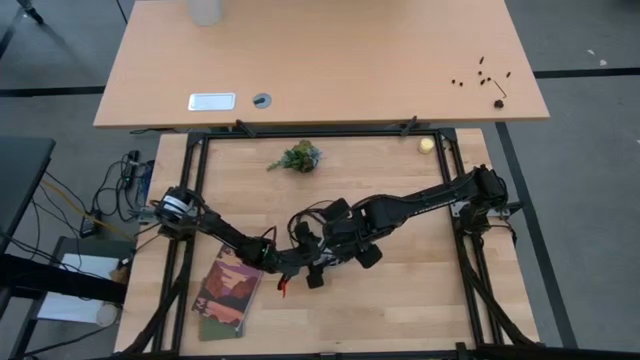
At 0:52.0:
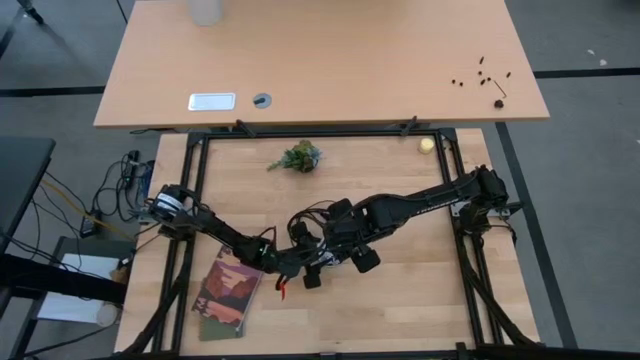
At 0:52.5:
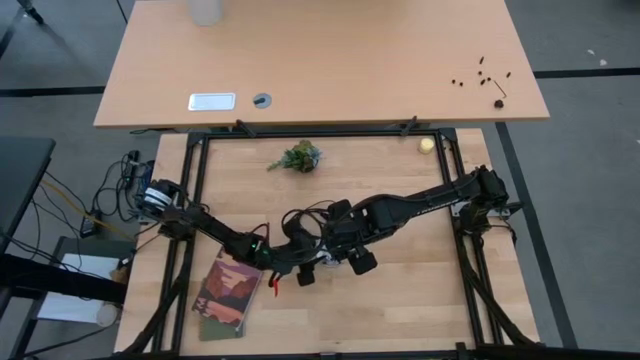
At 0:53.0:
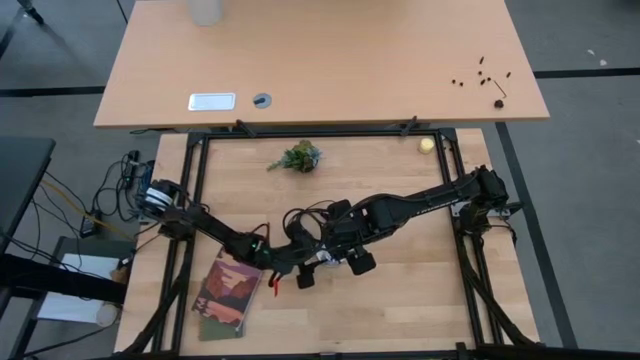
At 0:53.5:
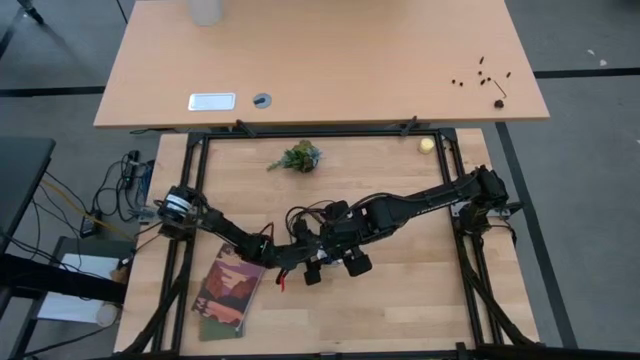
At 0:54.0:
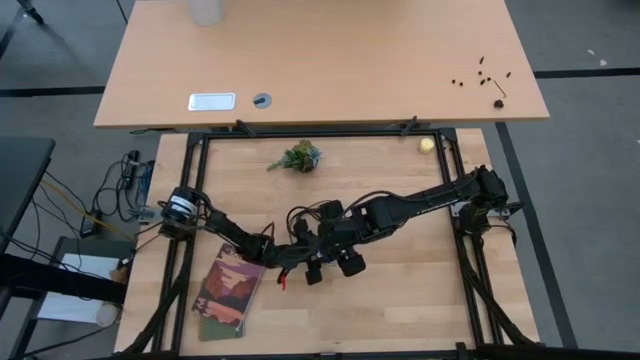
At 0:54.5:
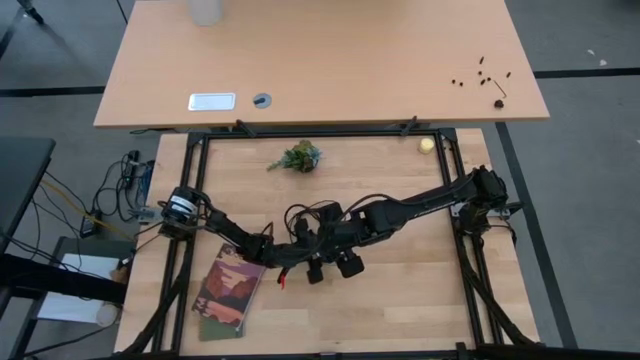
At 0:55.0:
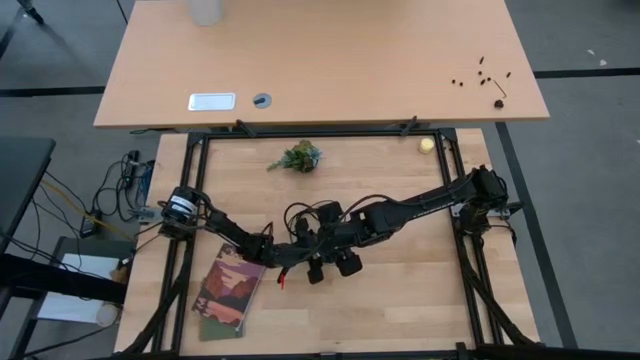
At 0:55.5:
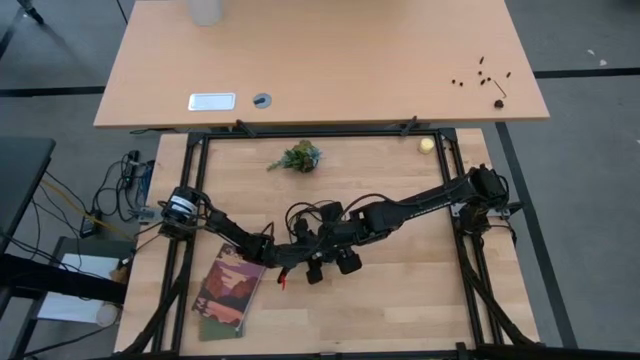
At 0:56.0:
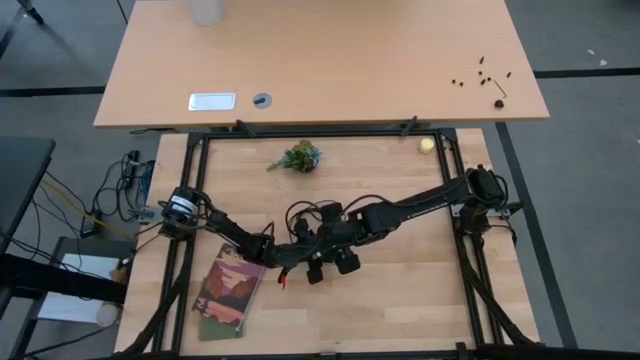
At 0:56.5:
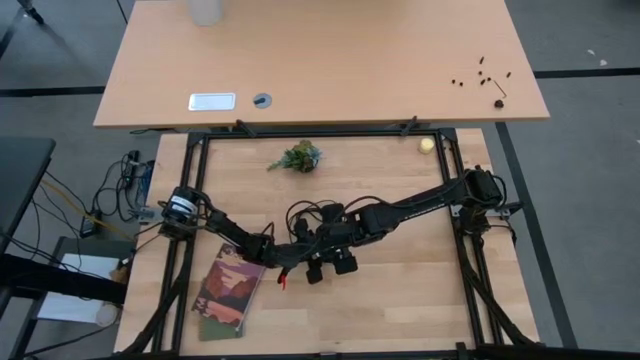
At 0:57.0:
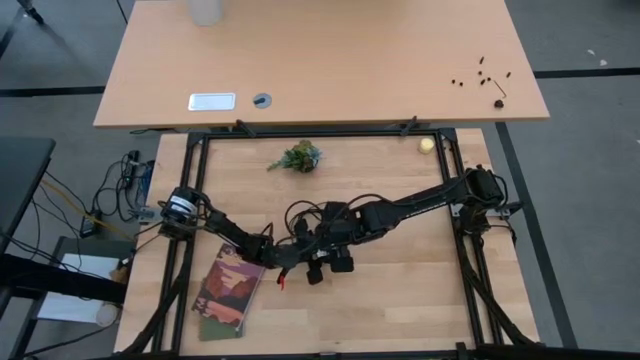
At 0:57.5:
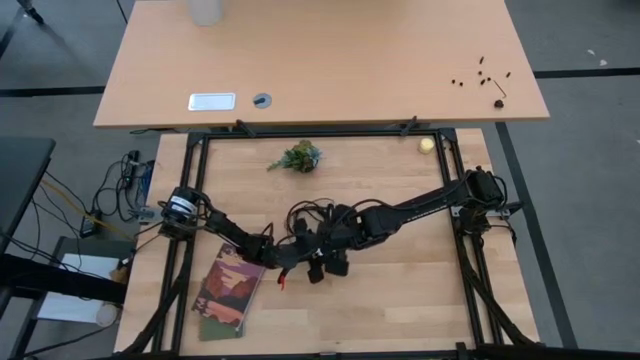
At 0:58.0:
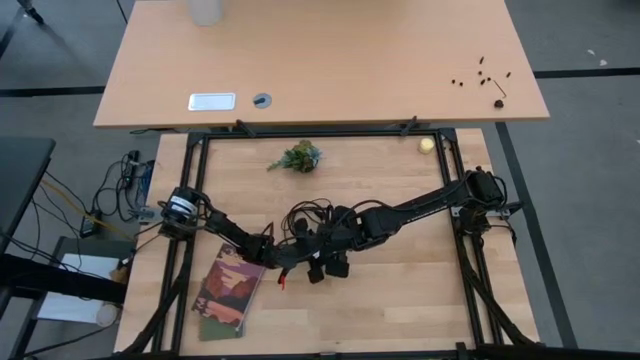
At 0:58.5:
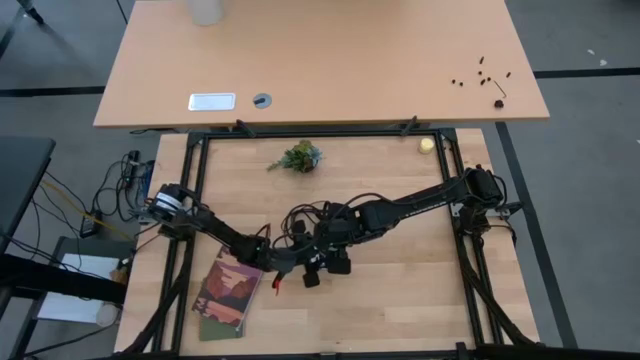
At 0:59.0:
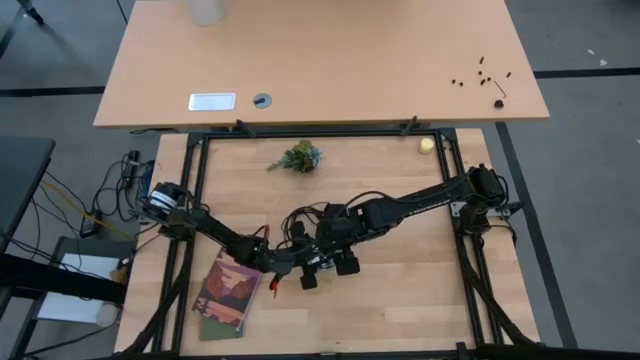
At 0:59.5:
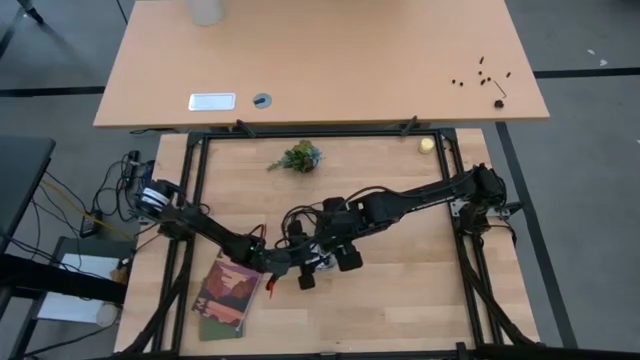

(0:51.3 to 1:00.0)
Task: Screw lightbulb
Insert the white lightbulb into the lamp socket

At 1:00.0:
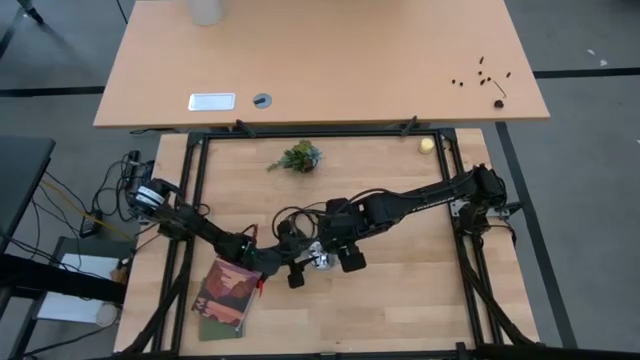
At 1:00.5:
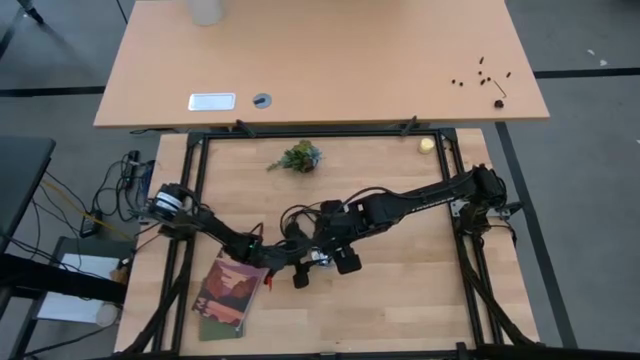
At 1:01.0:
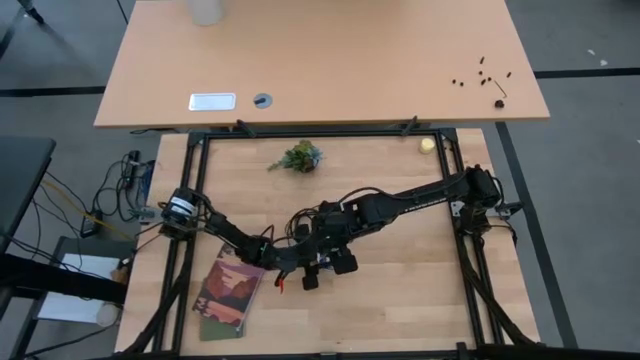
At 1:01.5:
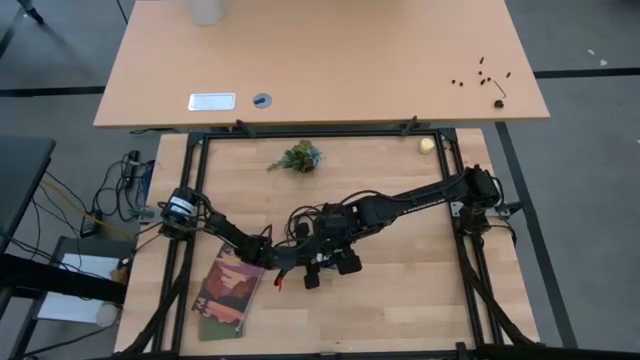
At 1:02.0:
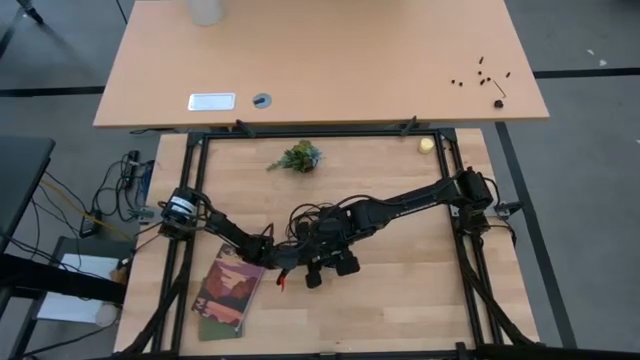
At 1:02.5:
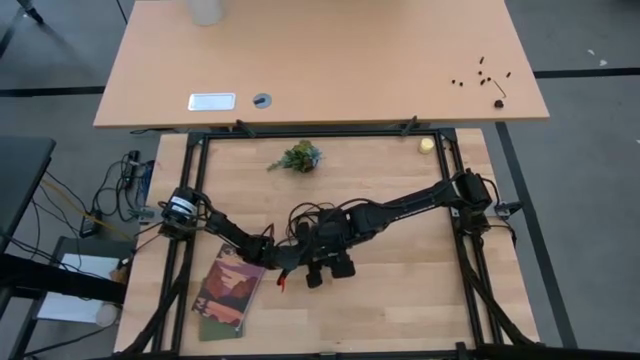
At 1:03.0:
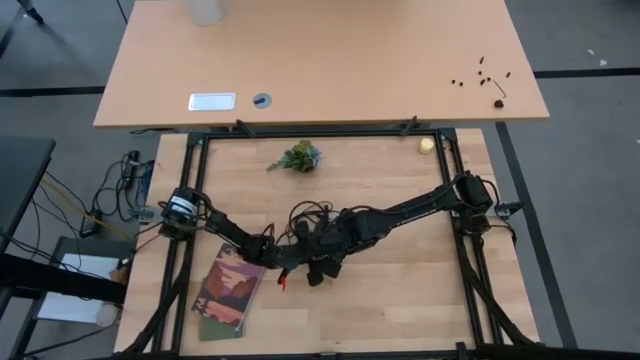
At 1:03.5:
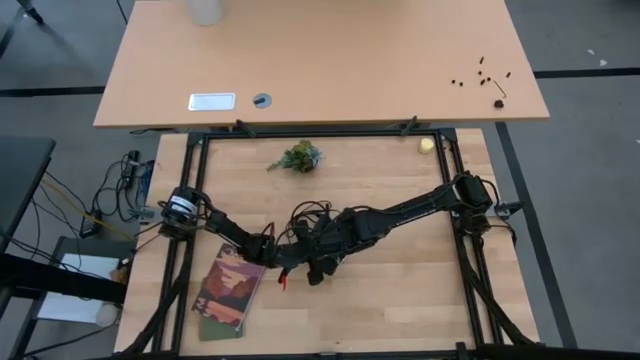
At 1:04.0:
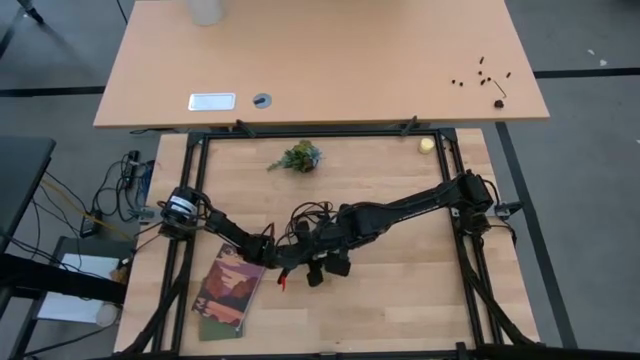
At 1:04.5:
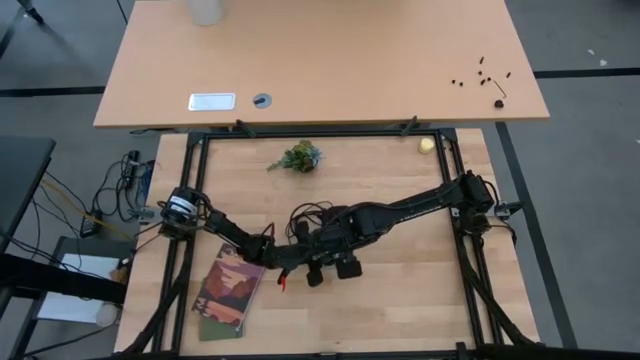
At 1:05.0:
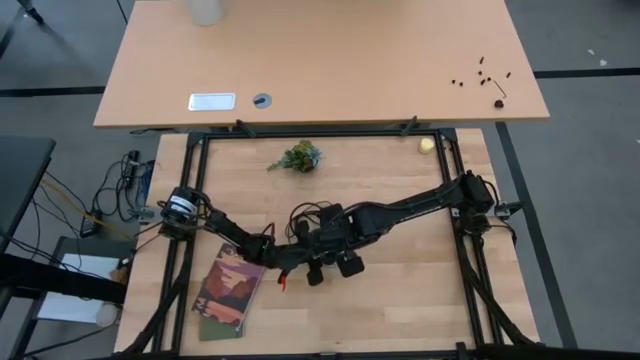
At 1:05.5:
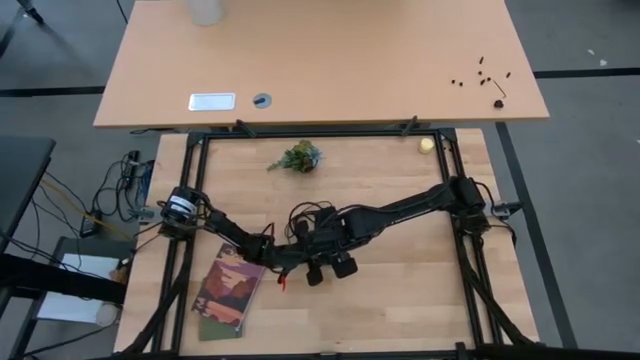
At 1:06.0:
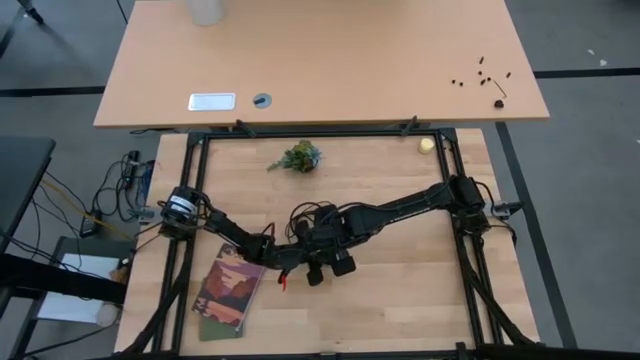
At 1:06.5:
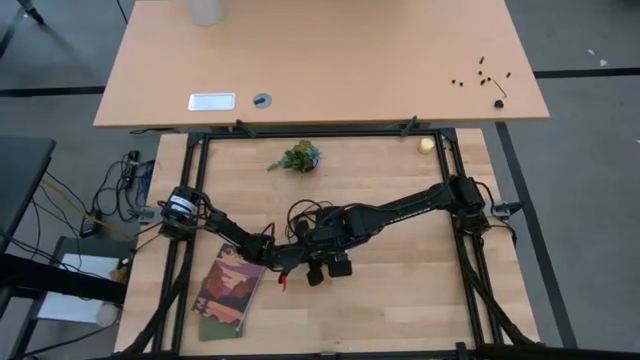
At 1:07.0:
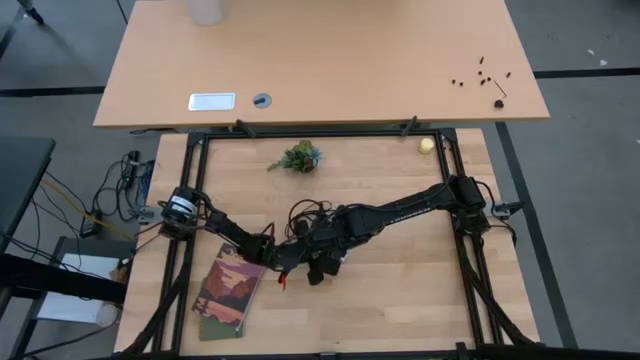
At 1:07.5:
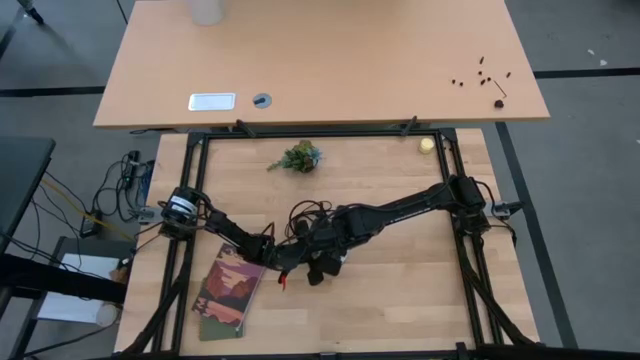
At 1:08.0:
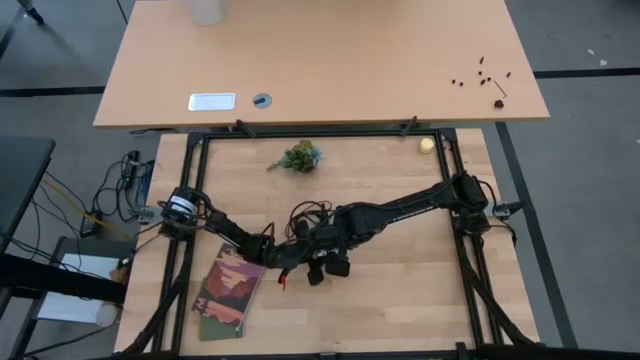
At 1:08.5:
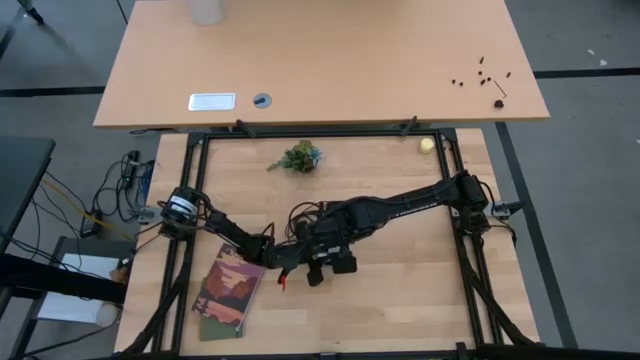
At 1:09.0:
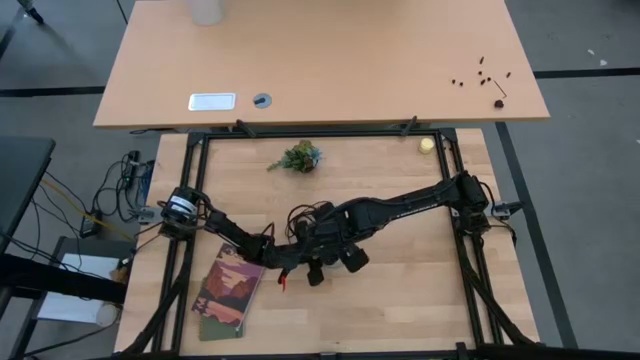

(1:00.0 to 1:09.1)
Insert the white lightbulb into the lamp socket

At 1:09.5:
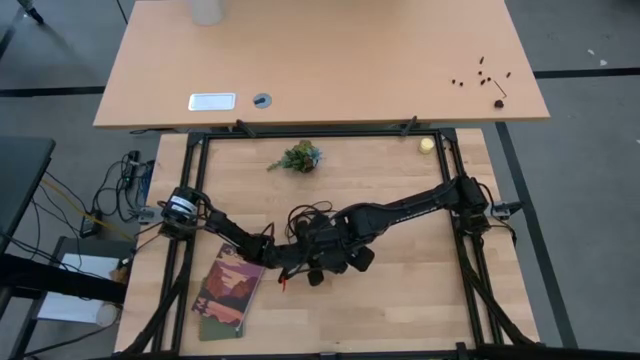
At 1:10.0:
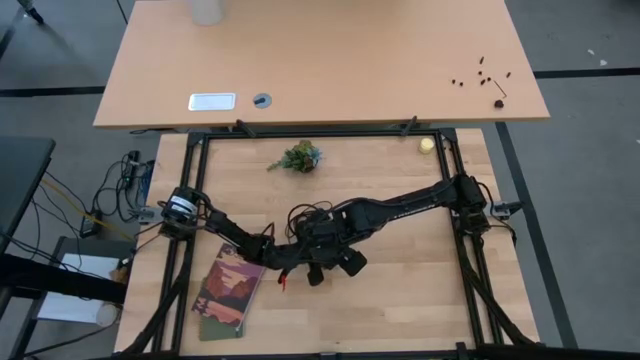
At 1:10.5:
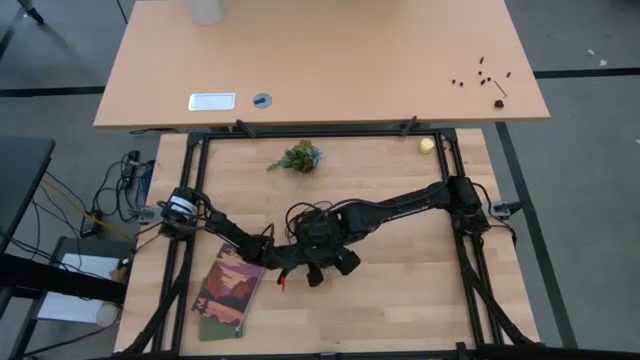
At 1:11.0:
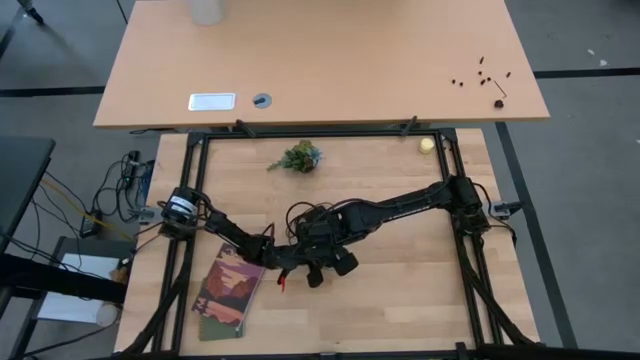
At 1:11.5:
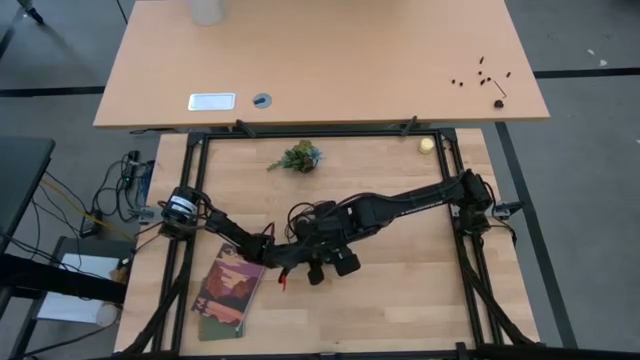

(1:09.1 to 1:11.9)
Insert the white lightbulb into the lamp socket
